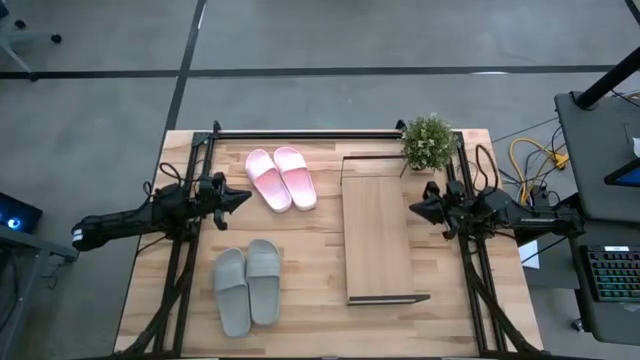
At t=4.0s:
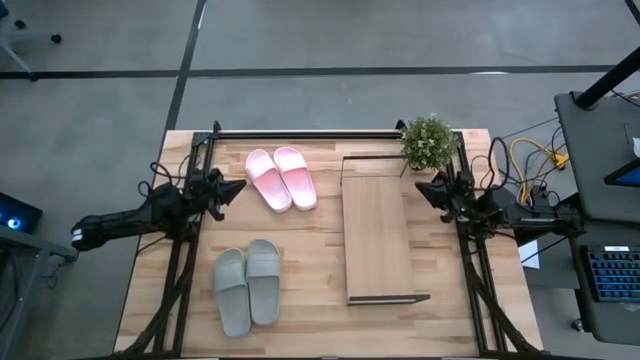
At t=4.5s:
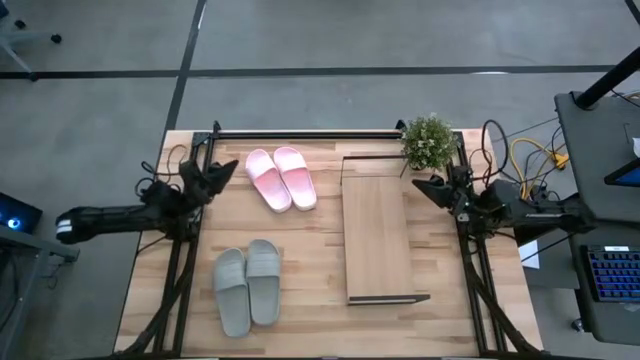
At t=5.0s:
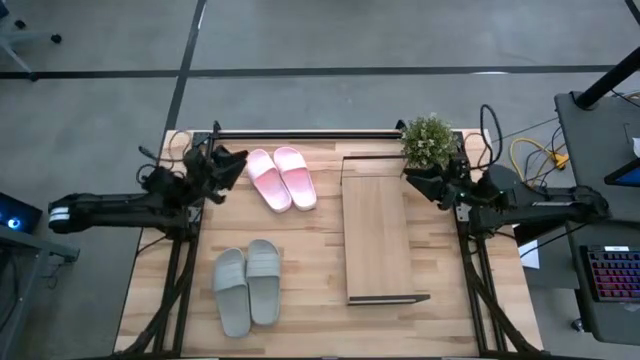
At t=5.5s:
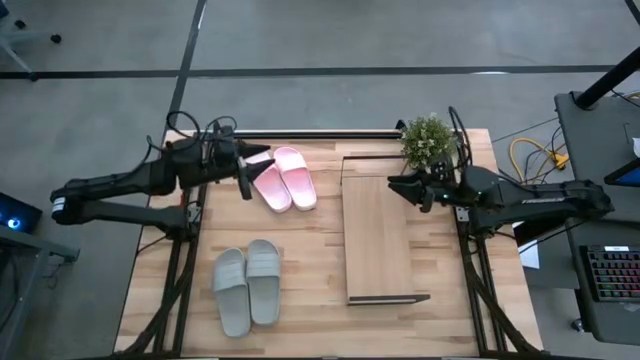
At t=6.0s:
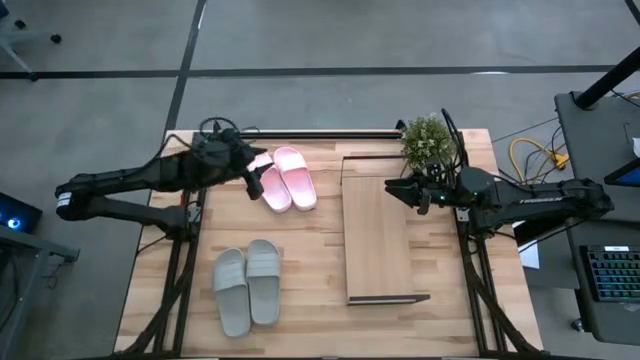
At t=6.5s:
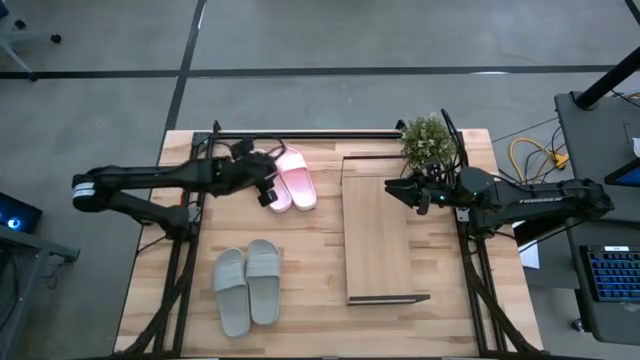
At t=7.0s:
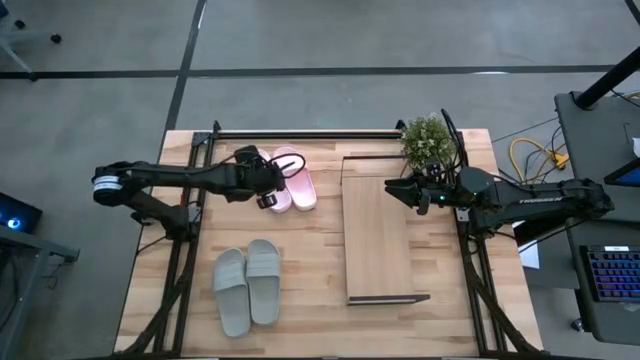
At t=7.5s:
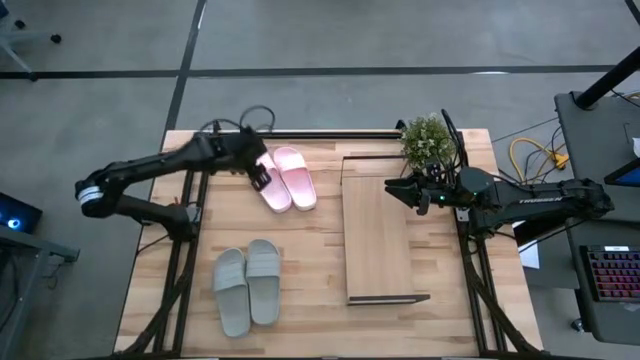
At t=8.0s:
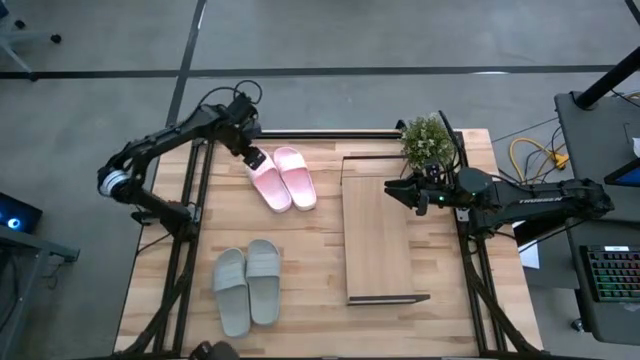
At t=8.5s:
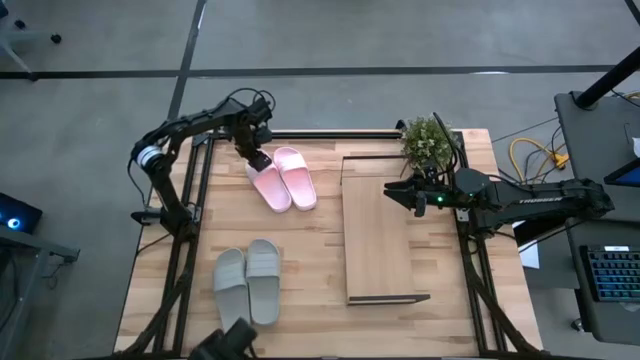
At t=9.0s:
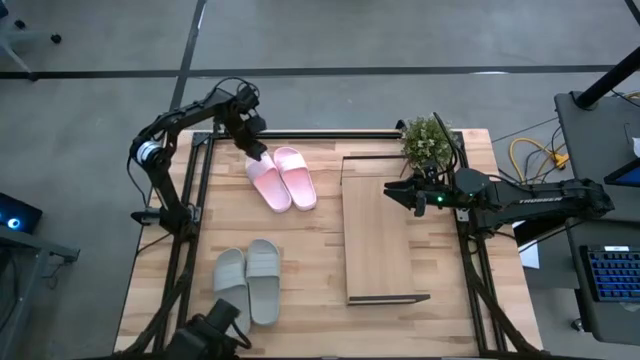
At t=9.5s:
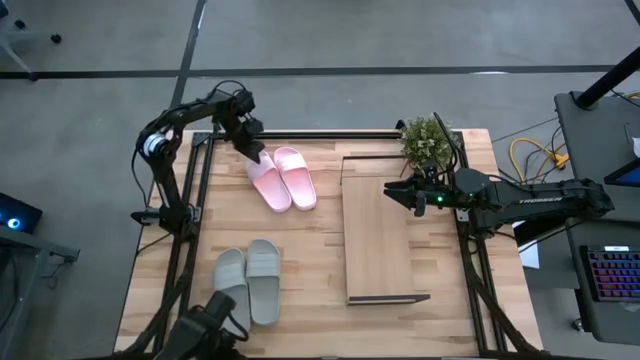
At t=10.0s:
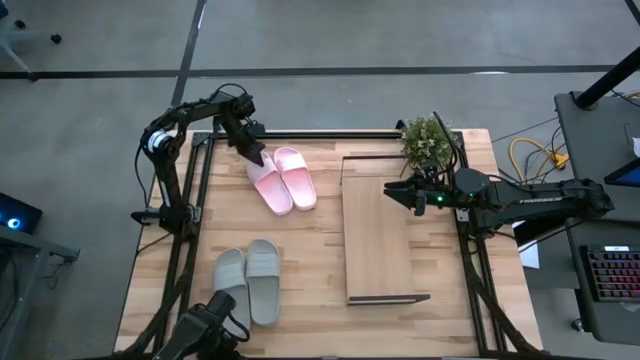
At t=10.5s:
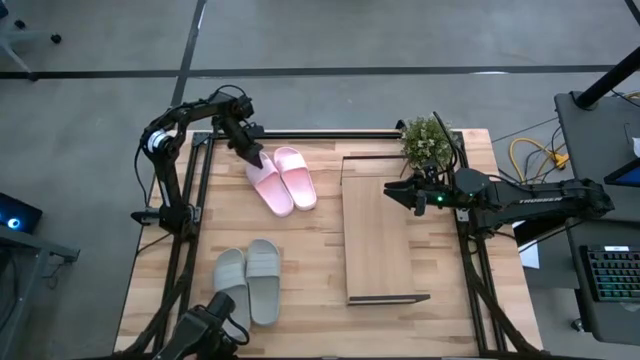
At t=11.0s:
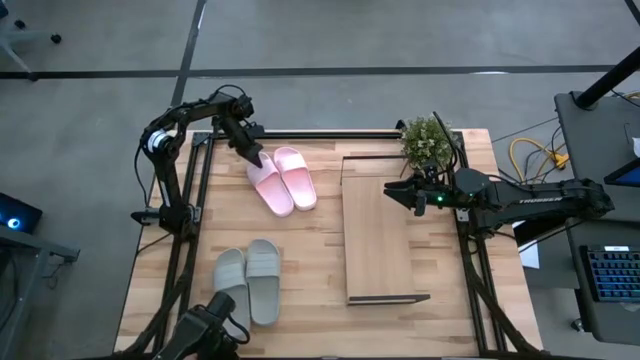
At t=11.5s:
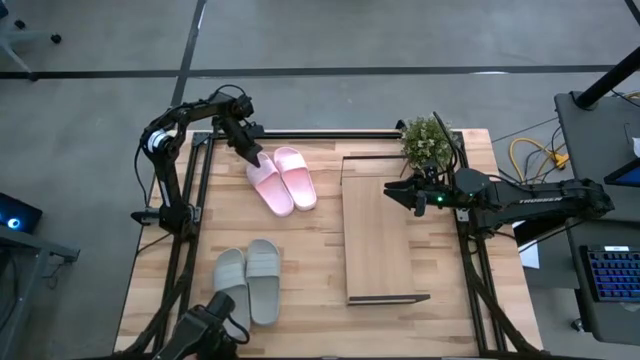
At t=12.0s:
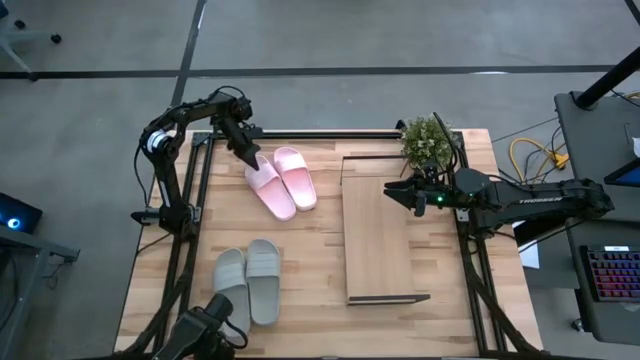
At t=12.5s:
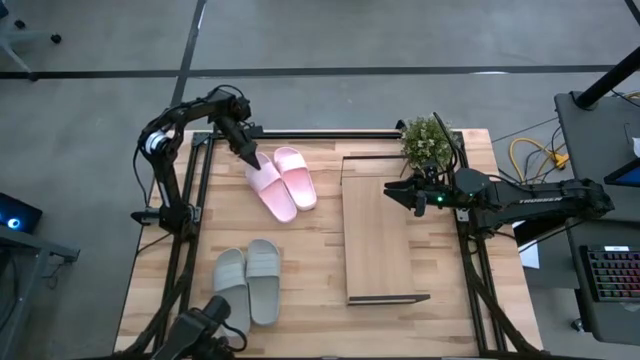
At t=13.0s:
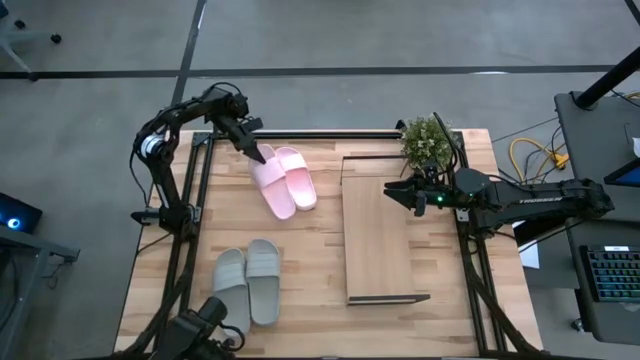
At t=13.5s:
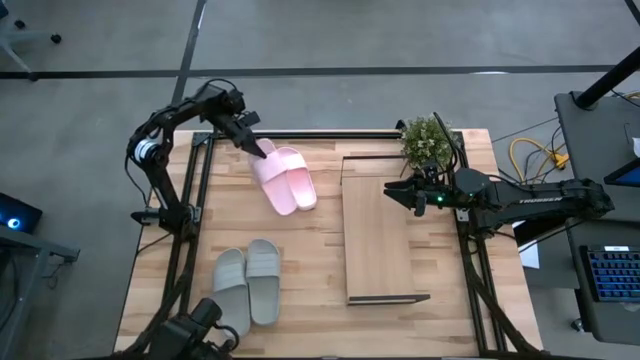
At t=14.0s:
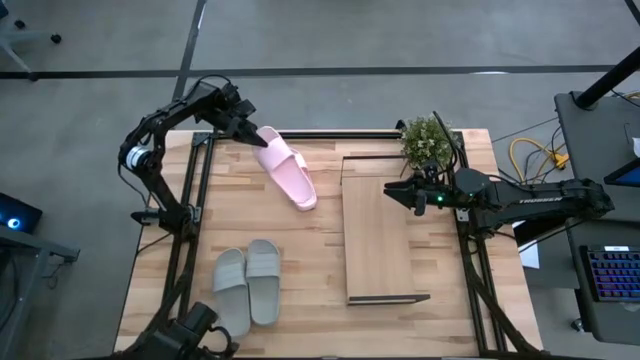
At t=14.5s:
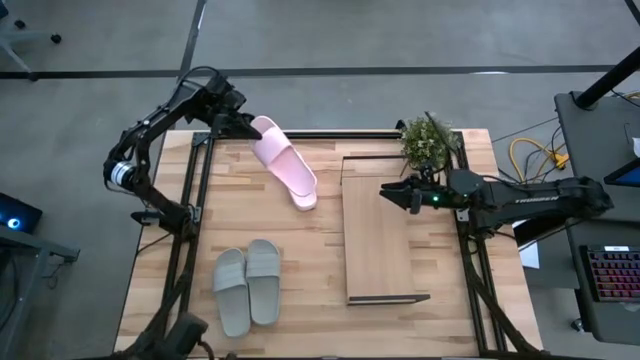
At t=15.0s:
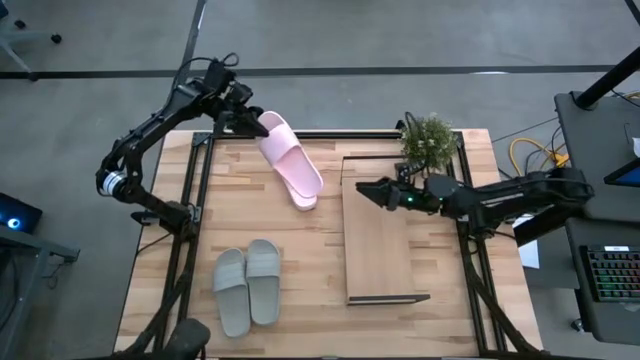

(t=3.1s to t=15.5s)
Task: Pick and place slides into the shelf
Put the left pink slide on the shelf

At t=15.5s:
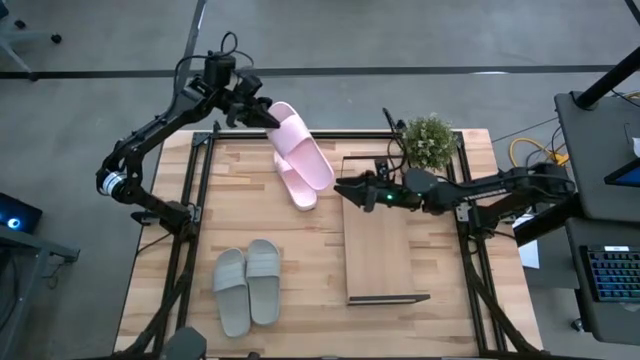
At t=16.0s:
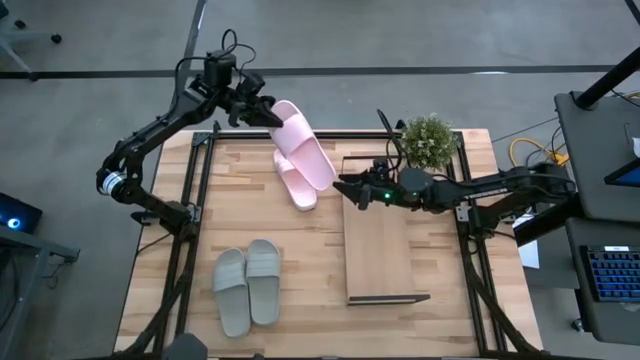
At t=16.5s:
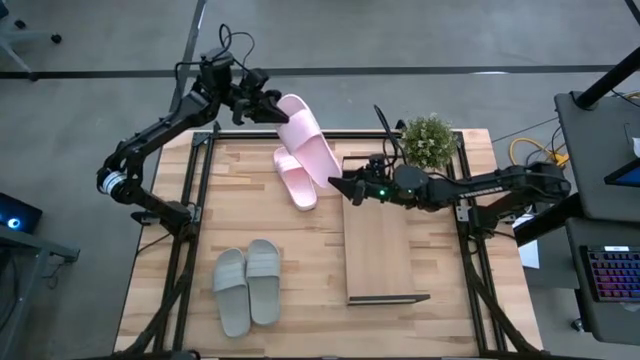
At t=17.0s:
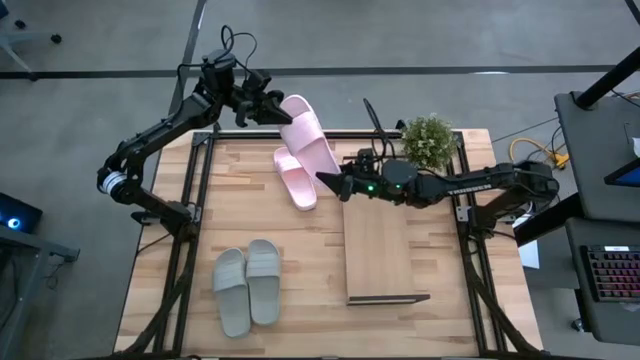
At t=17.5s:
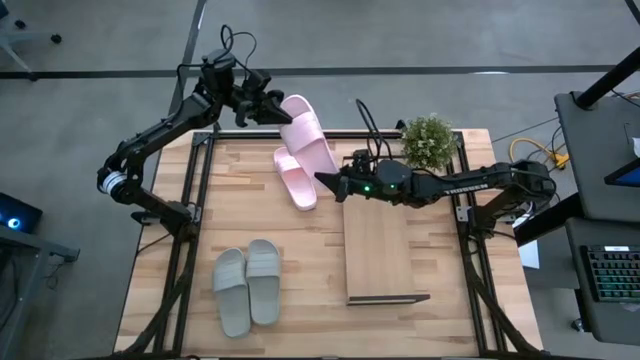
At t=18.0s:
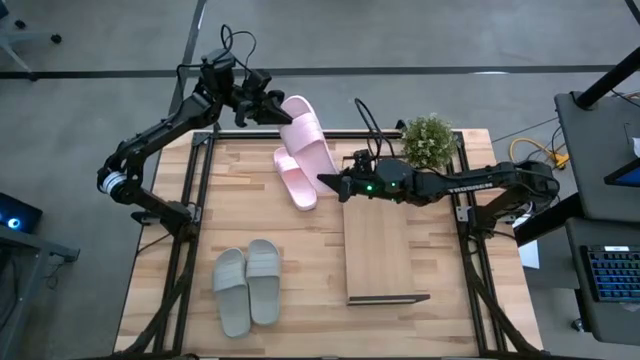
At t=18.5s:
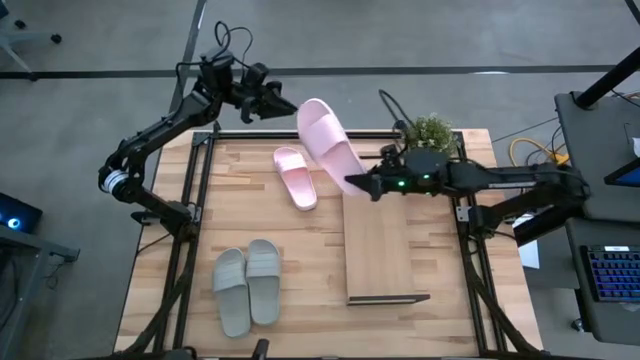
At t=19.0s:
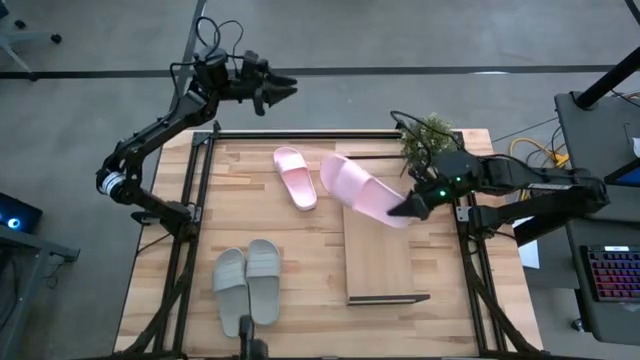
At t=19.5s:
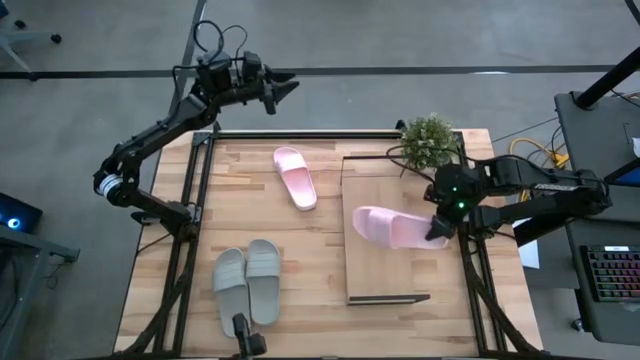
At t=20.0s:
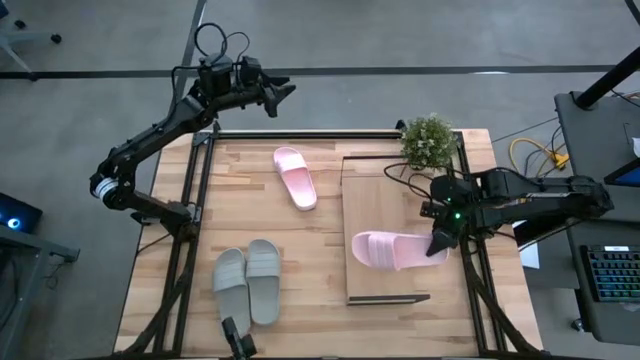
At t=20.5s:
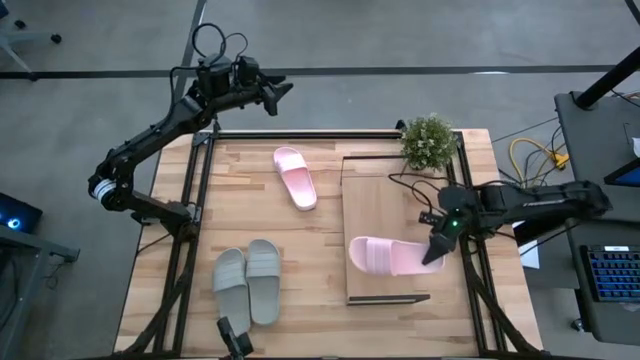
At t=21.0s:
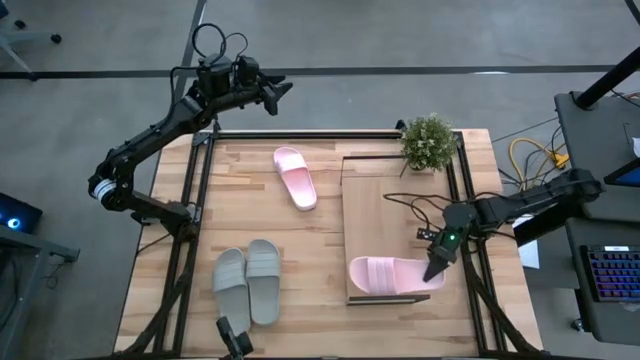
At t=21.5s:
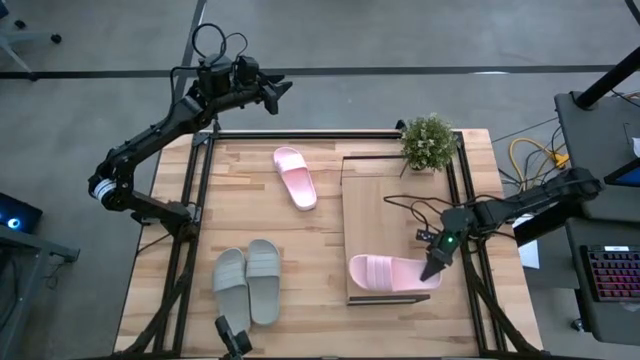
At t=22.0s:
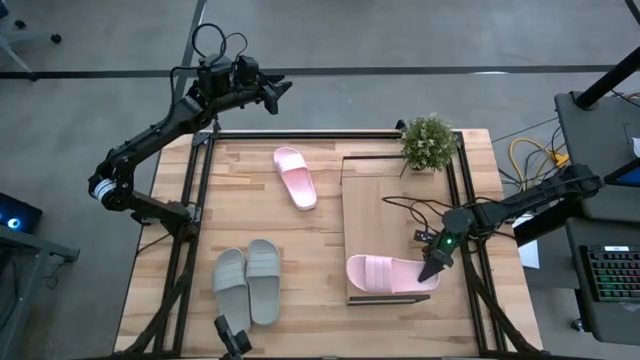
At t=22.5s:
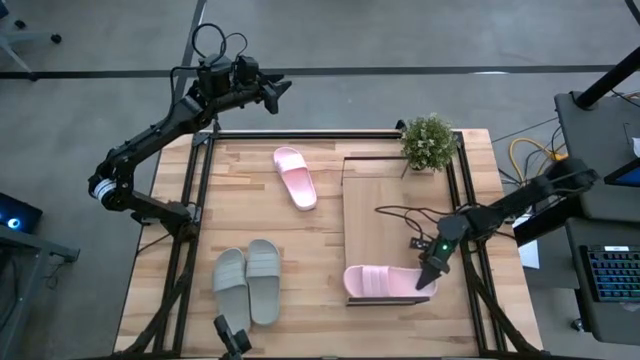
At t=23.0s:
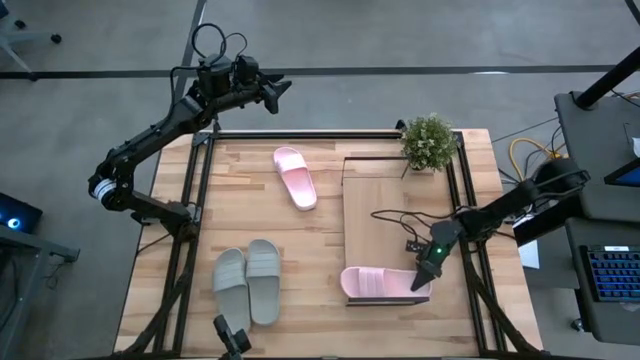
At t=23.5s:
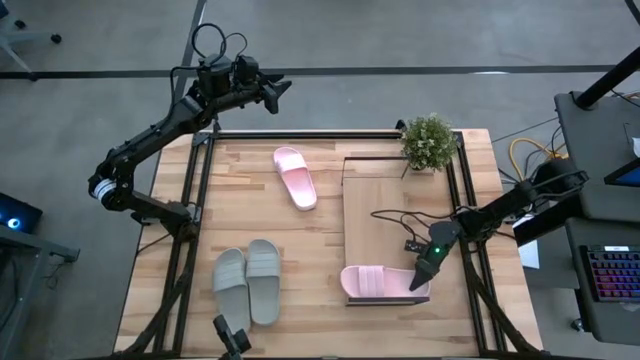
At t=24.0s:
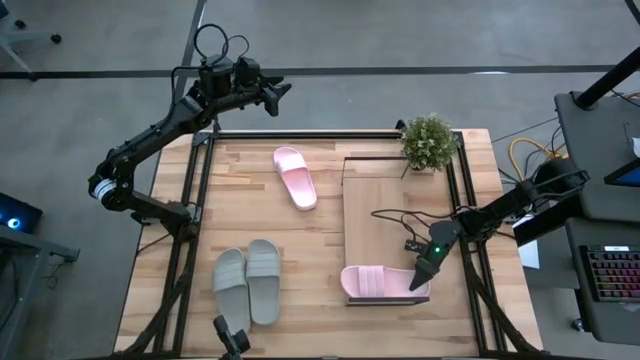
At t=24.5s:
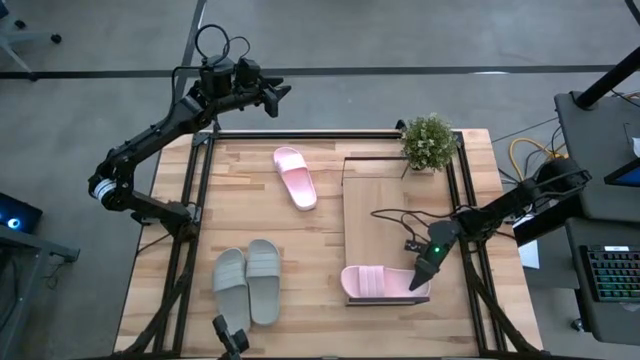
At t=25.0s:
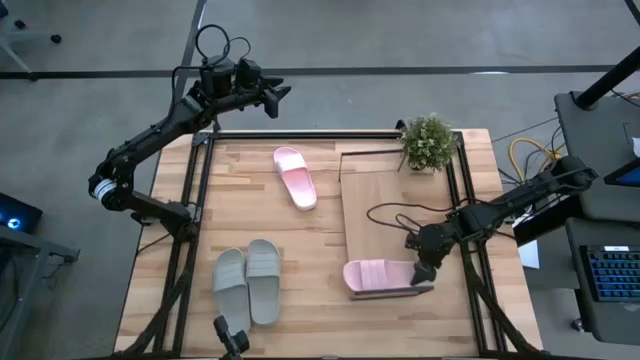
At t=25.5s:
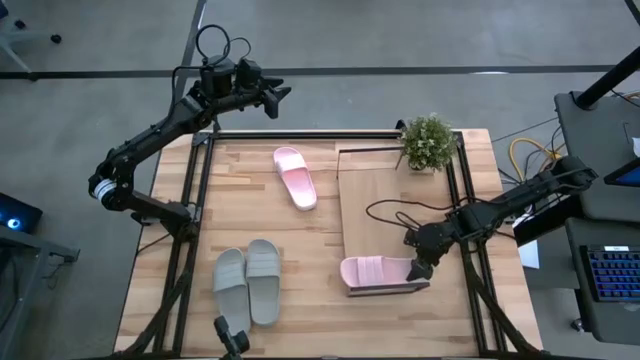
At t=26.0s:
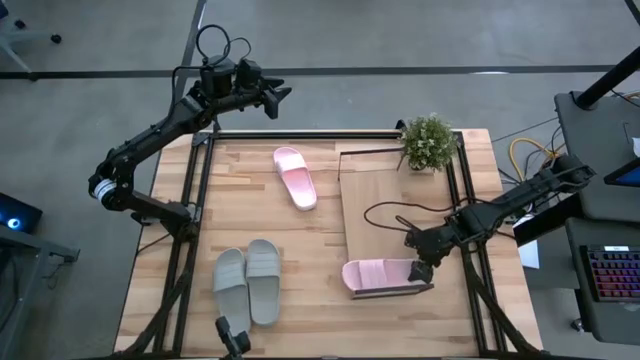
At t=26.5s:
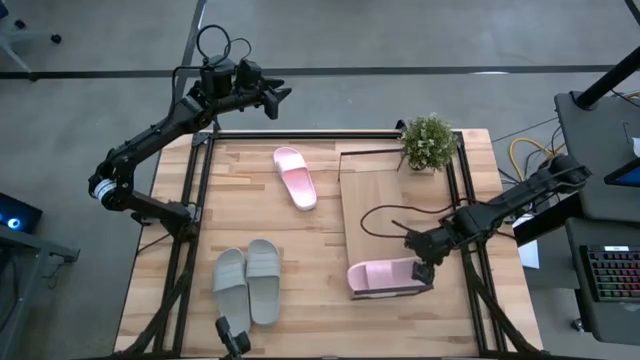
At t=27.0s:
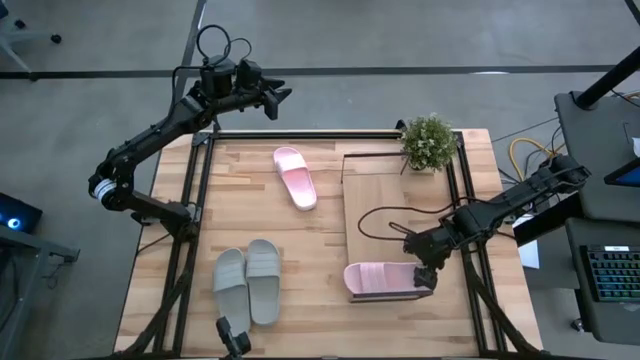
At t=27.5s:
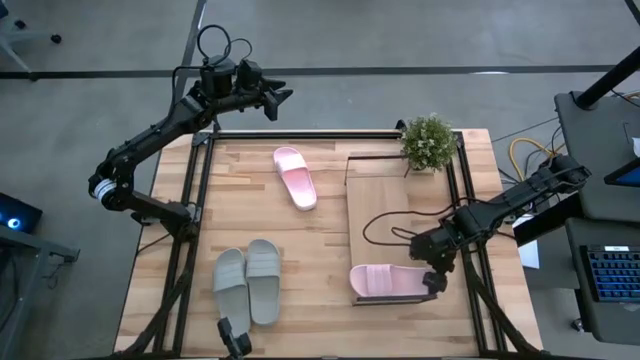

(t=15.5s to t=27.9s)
Put the left pink slide on the shelf
